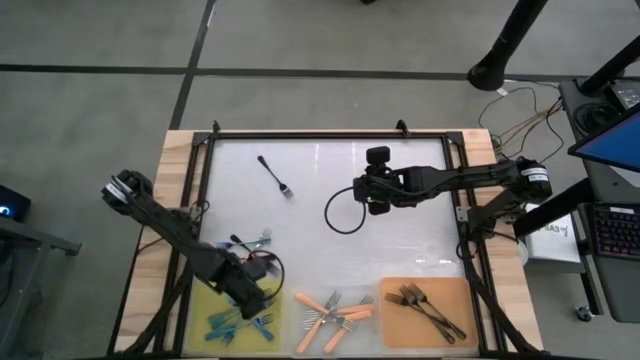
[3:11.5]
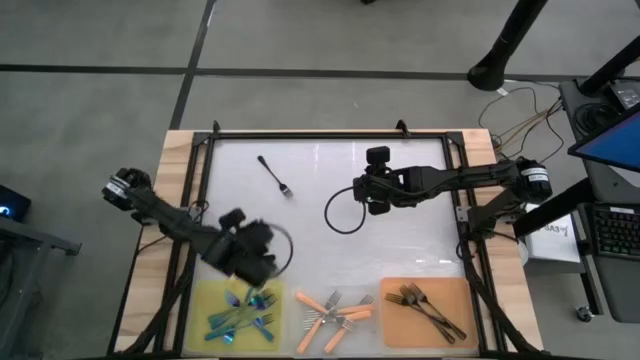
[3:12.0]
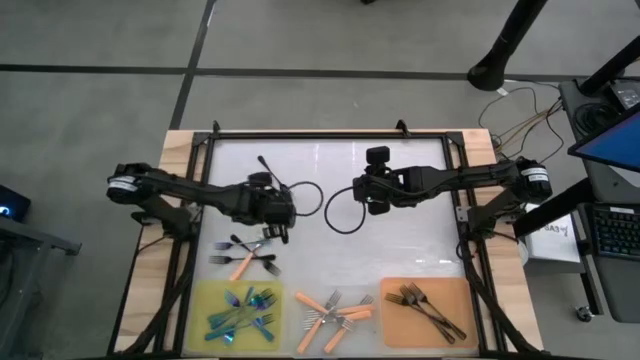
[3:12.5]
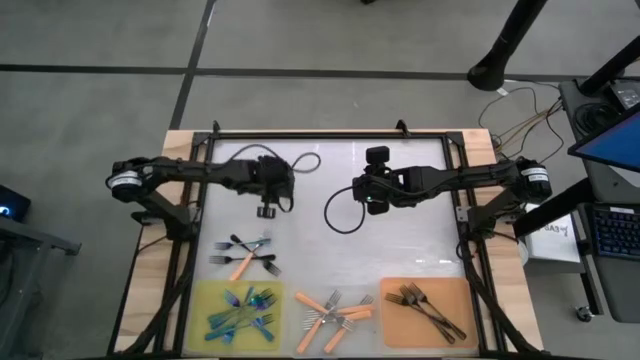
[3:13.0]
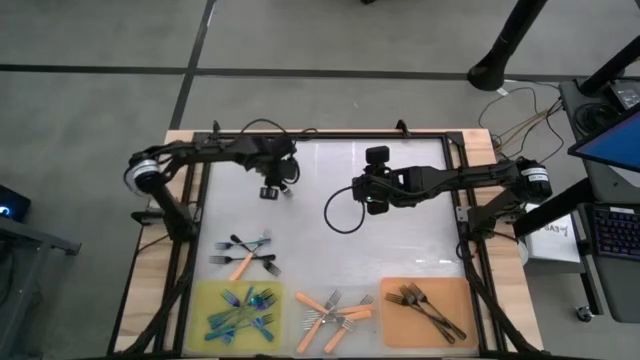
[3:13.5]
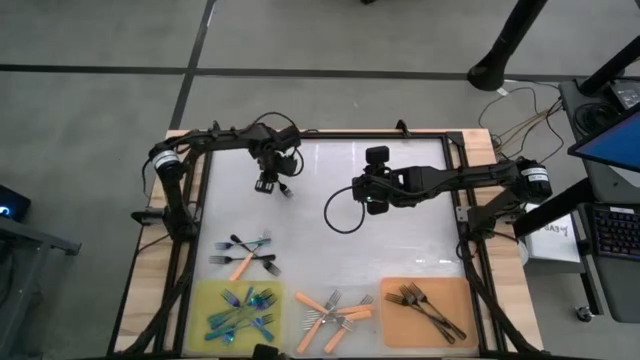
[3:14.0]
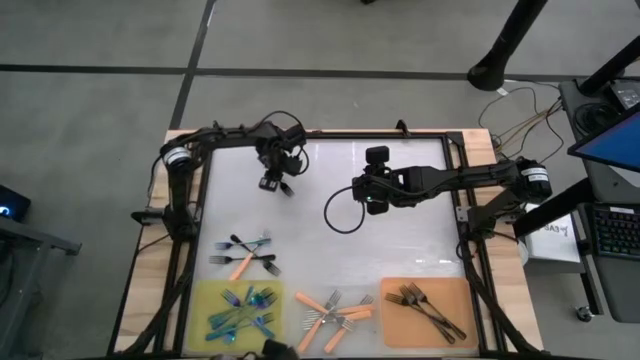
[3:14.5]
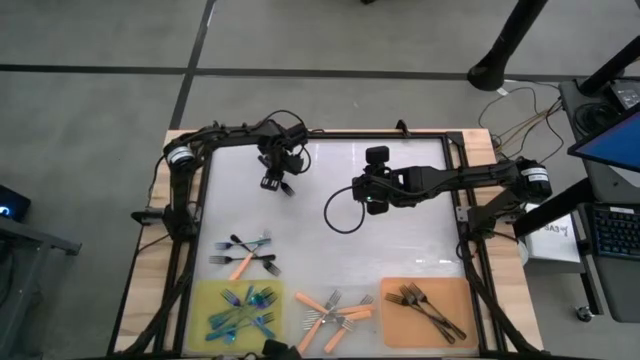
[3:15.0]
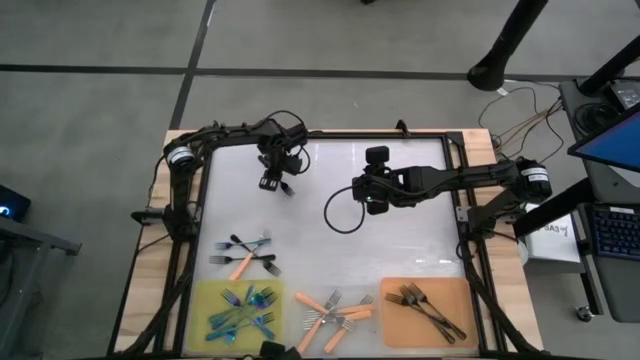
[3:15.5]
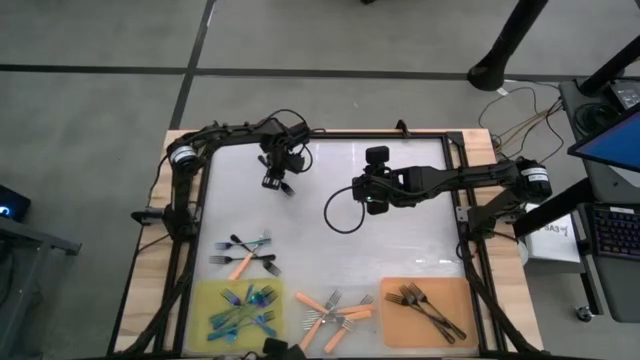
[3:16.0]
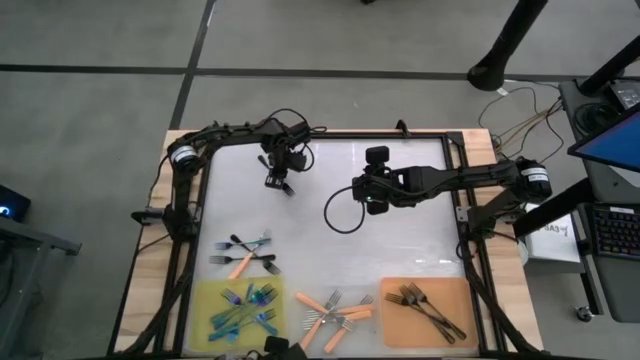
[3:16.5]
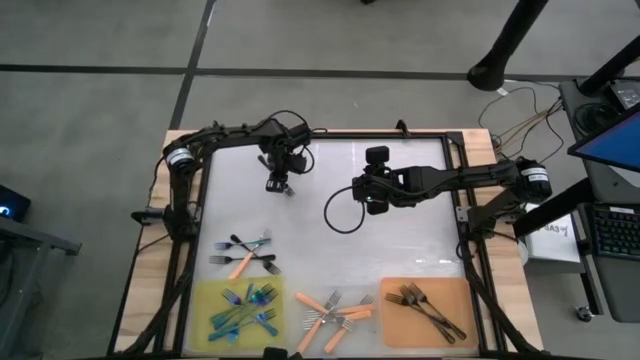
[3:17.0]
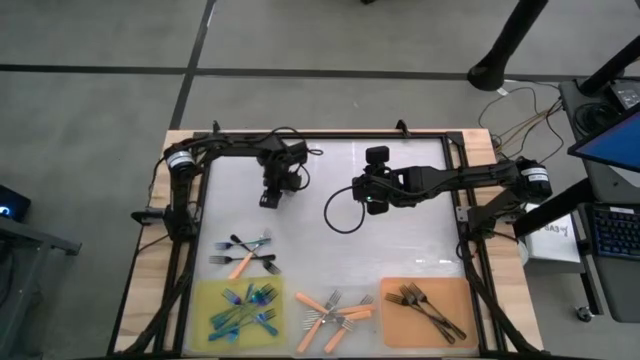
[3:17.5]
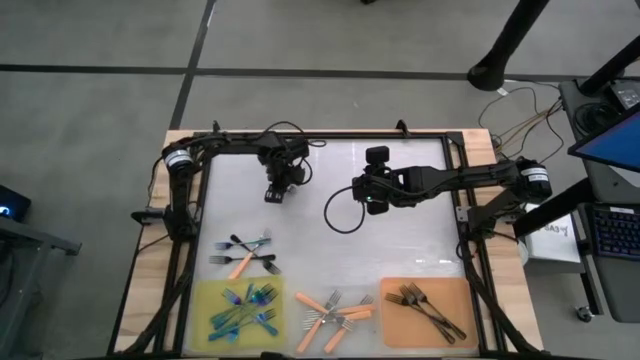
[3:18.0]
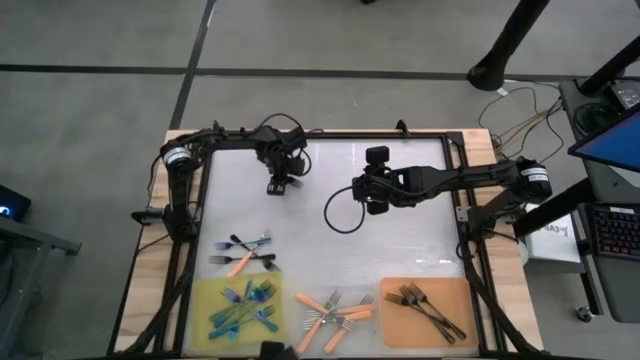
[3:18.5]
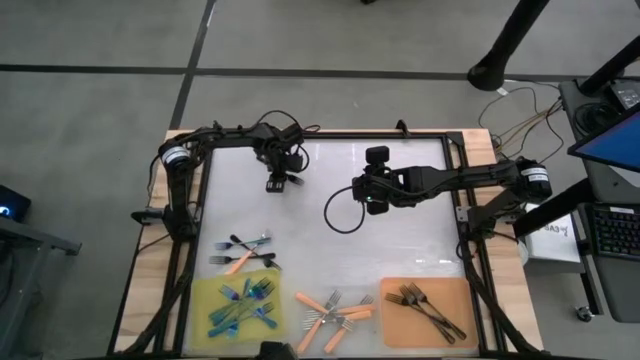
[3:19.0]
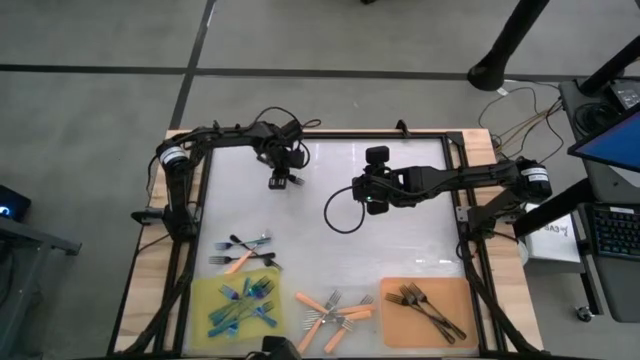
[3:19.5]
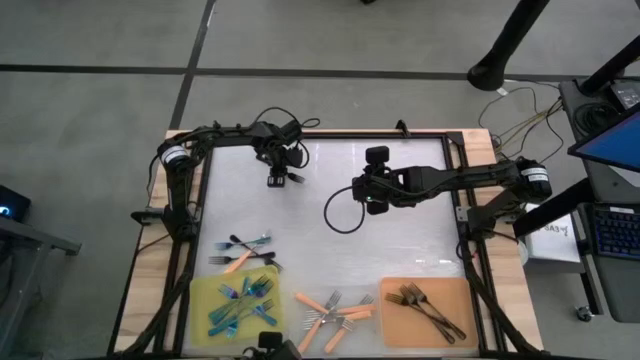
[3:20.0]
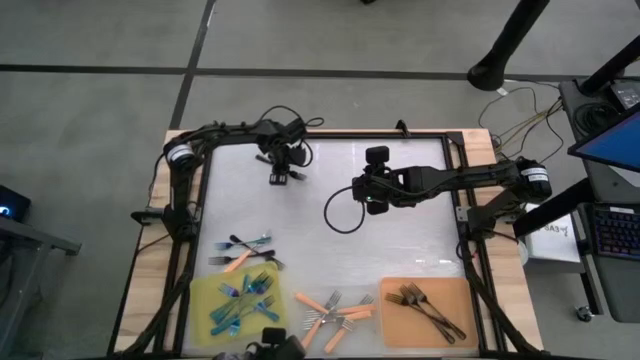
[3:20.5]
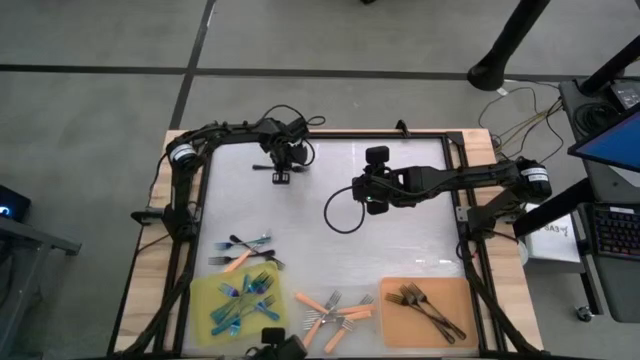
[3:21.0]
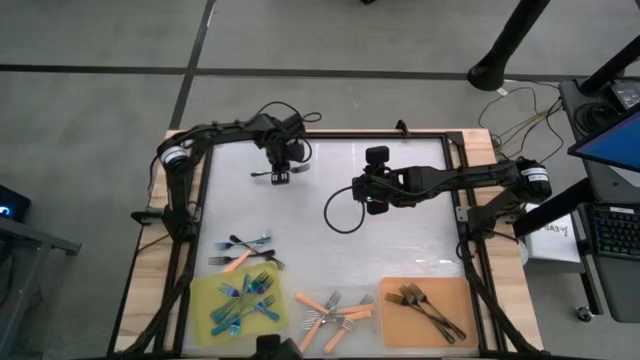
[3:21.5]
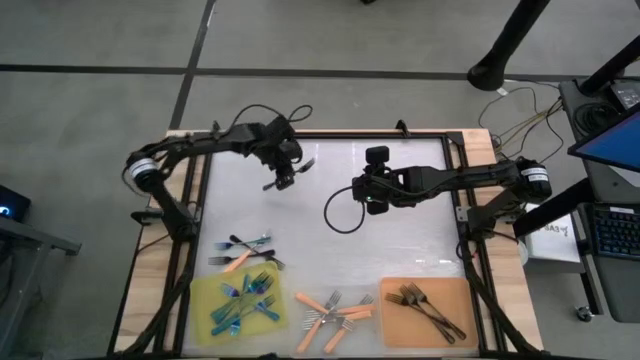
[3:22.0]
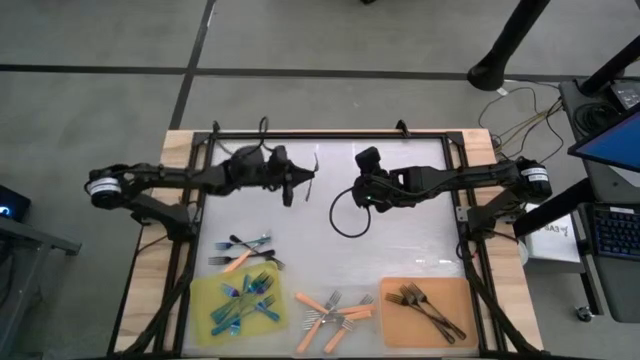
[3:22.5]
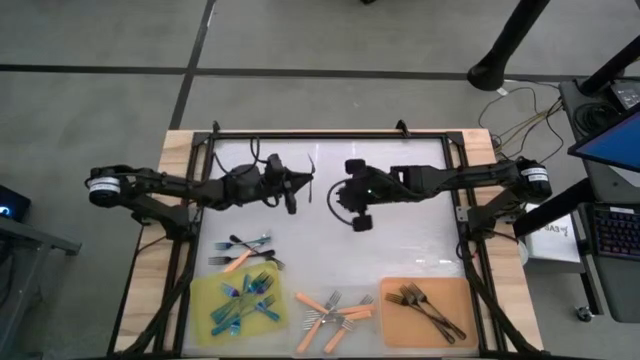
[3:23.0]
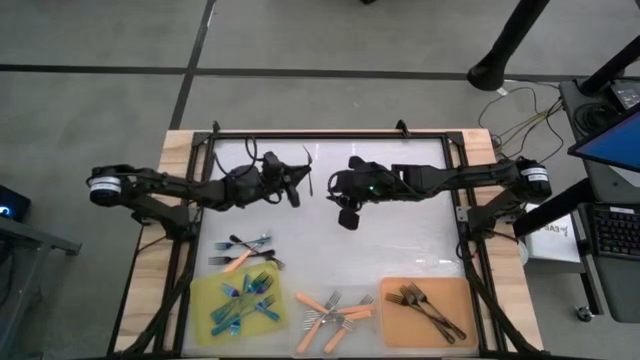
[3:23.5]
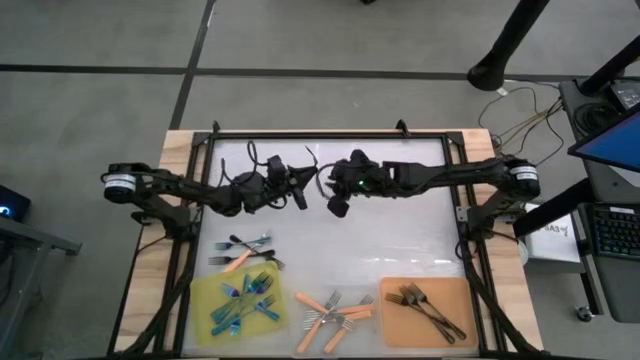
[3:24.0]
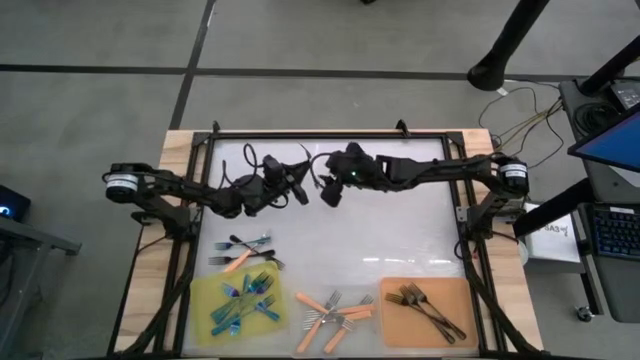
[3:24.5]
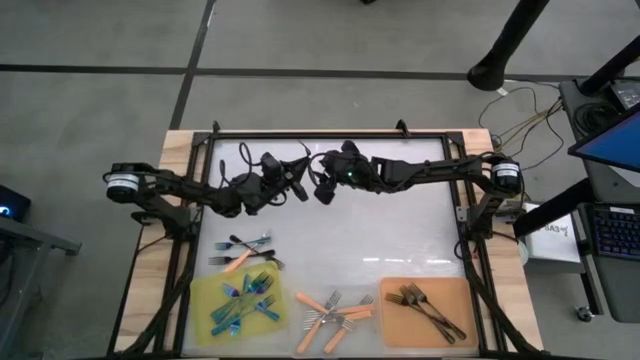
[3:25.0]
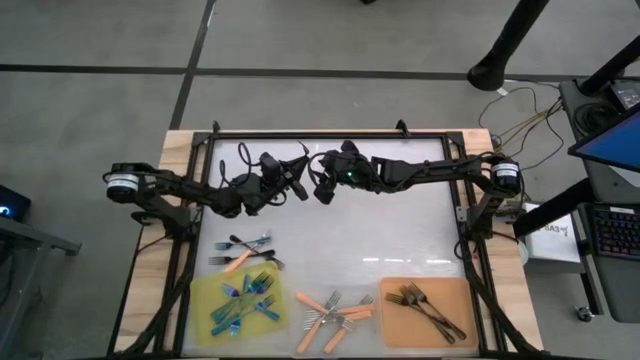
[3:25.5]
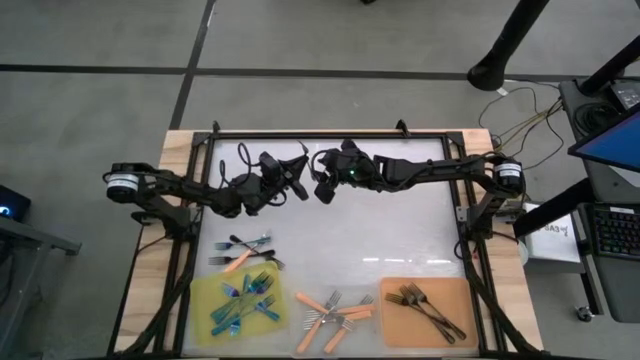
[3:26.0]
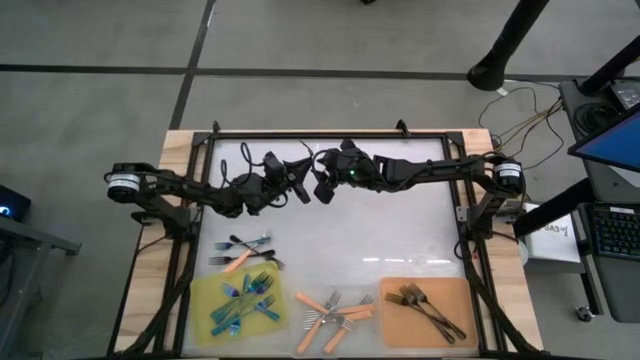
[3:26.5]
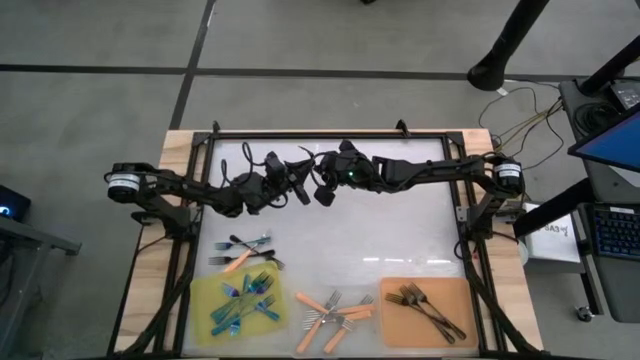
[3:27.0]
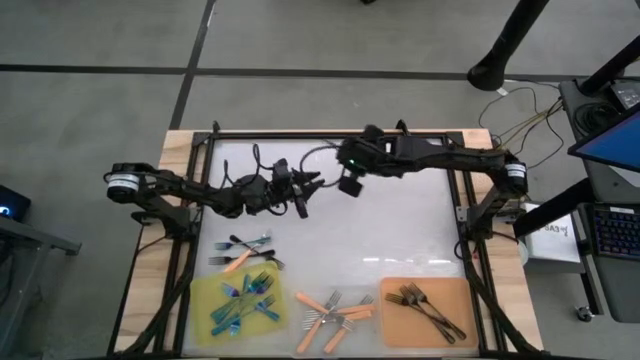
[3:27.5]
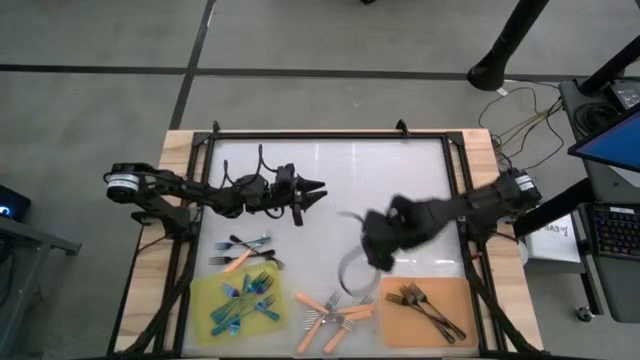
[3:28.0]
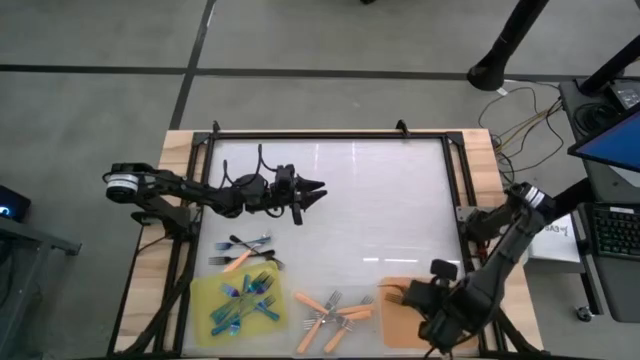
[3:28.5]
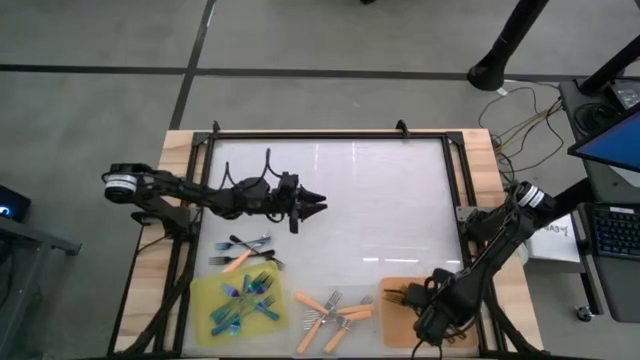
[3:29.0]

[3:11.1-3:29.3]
Task: Sort silverware by color (type)
Put the black fork into the orange bin

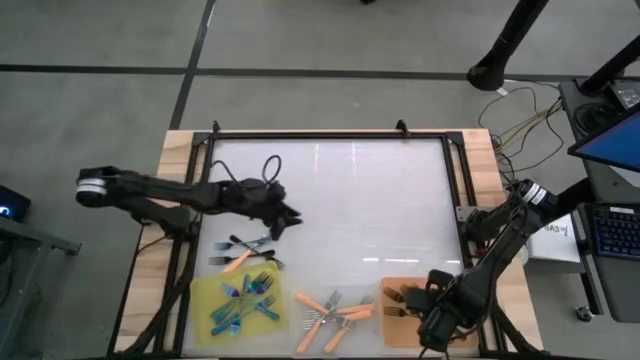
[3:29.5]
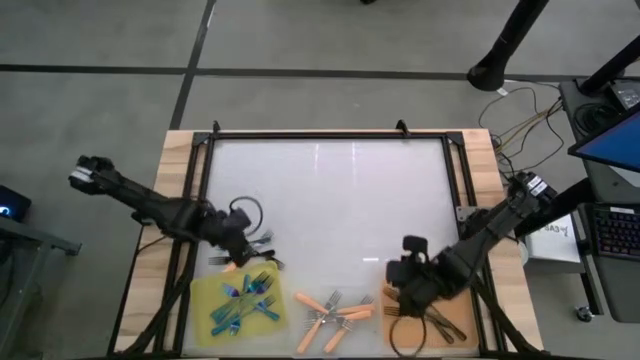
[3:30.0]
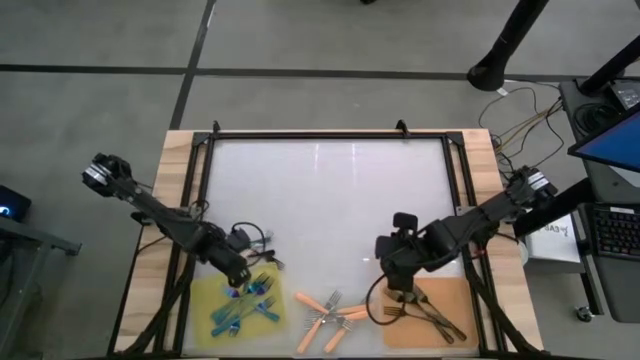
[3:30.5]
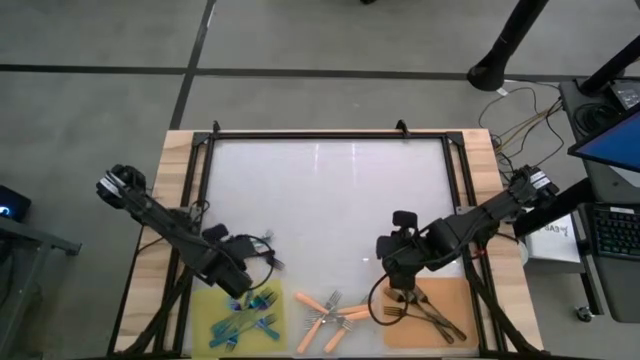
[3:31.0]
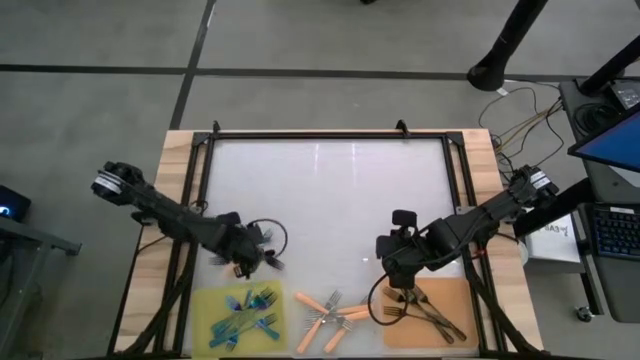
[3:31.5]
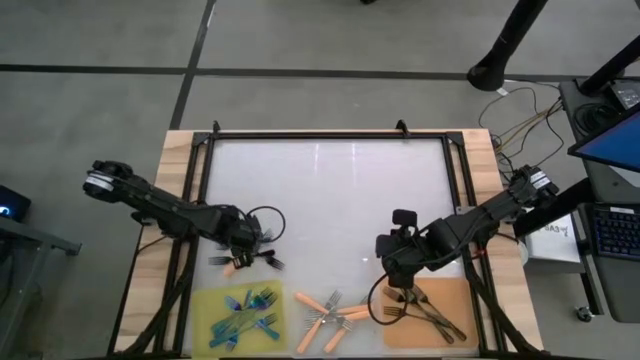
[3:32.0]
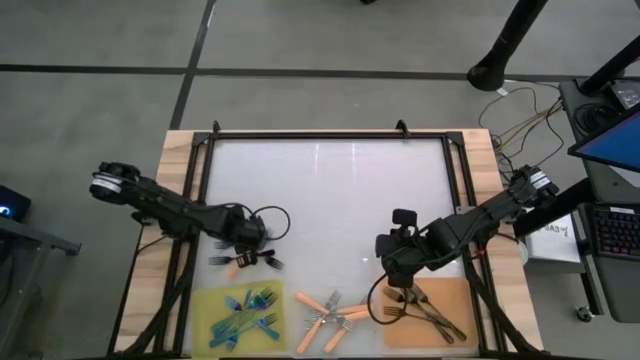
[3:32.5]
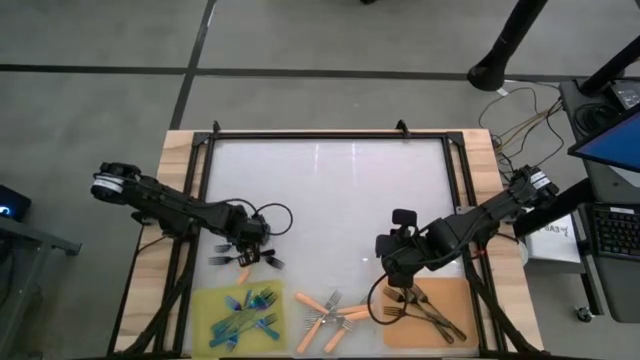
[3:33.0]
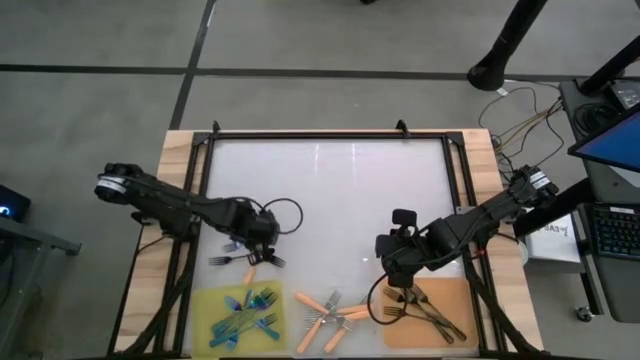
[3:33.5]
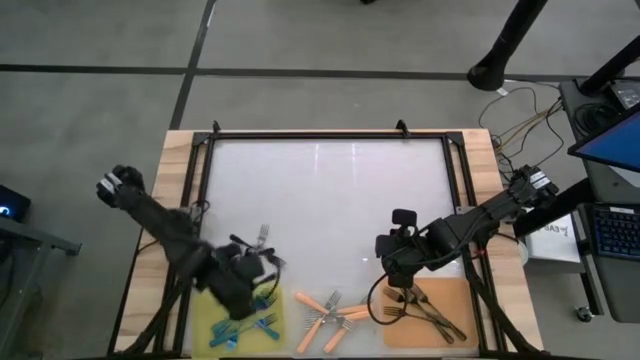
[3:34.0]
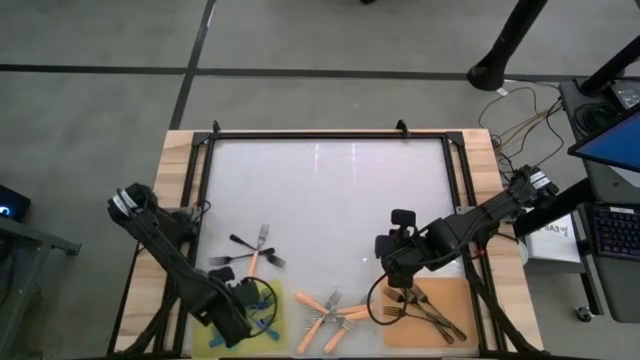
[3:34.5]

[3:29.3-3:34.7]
Put the blue fork into the yellow bin
